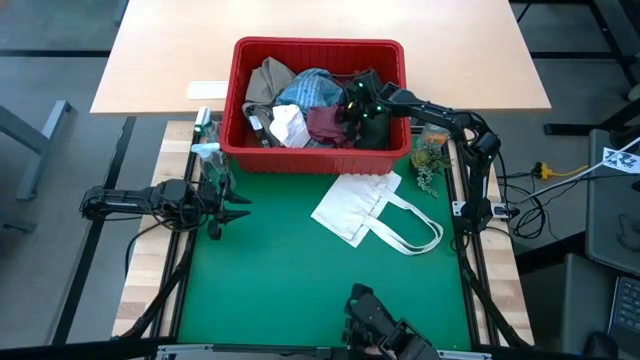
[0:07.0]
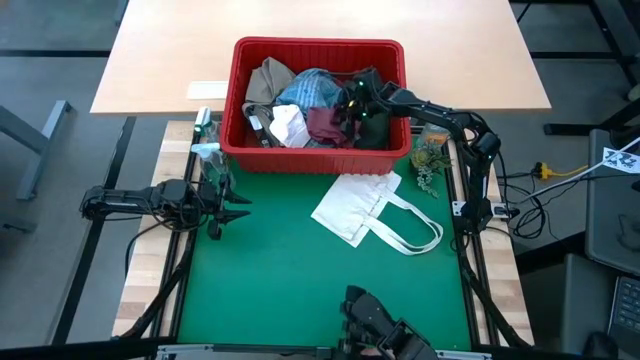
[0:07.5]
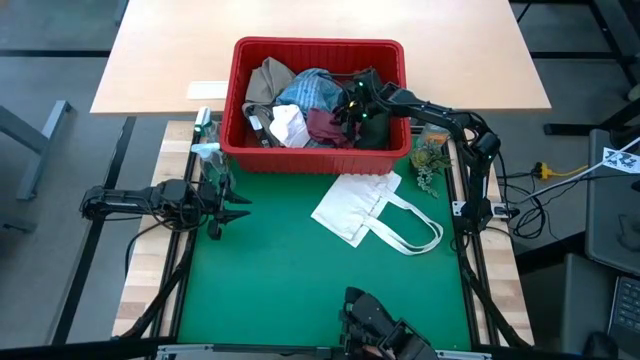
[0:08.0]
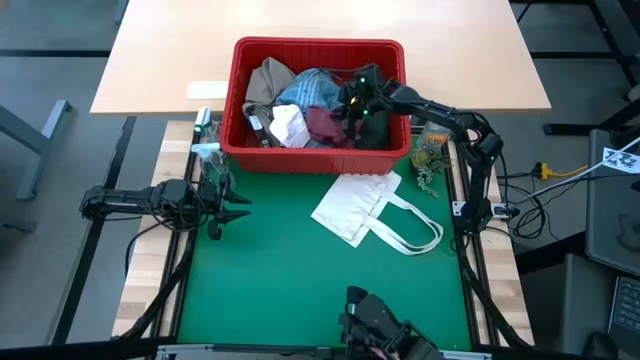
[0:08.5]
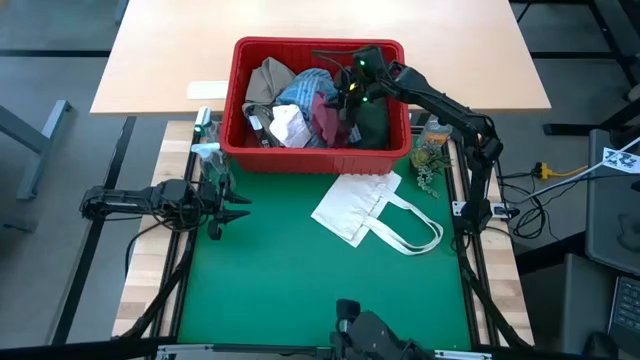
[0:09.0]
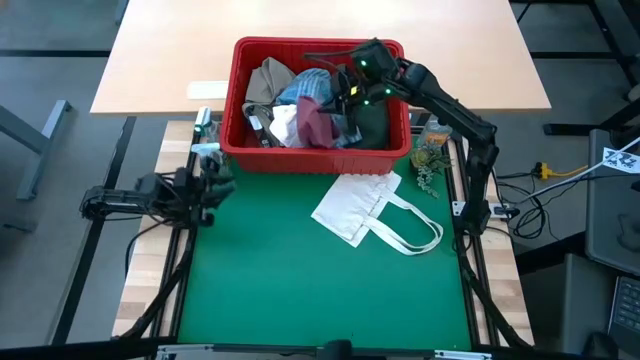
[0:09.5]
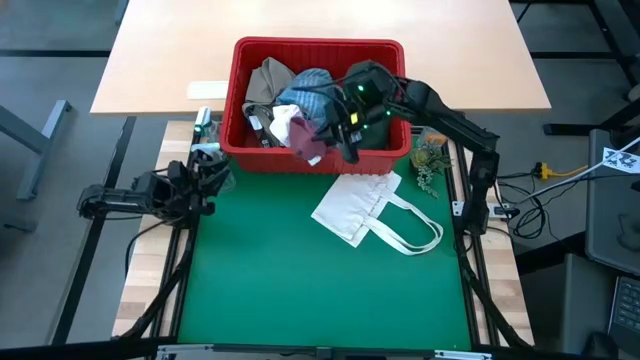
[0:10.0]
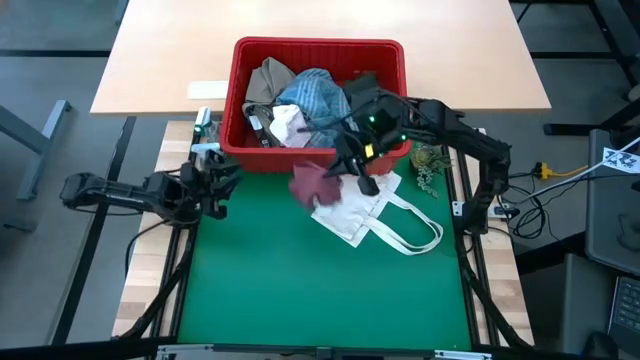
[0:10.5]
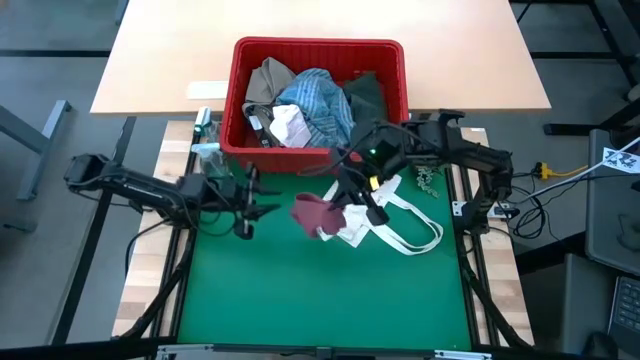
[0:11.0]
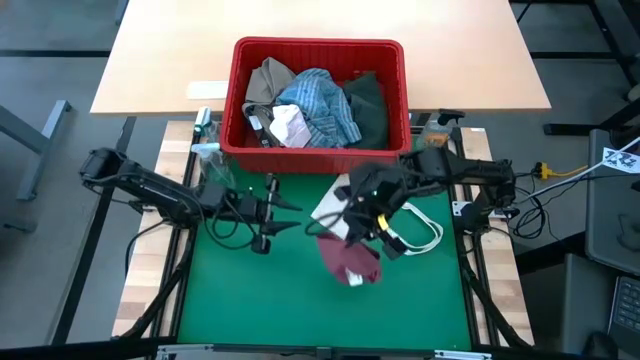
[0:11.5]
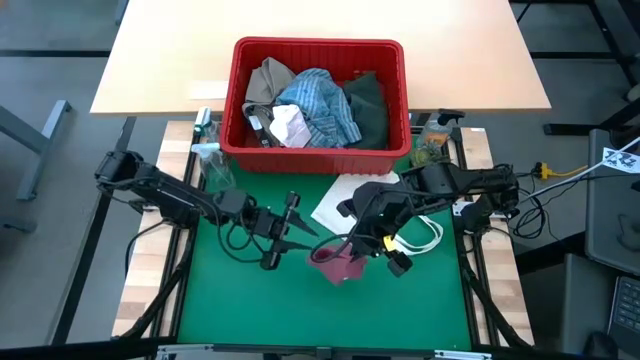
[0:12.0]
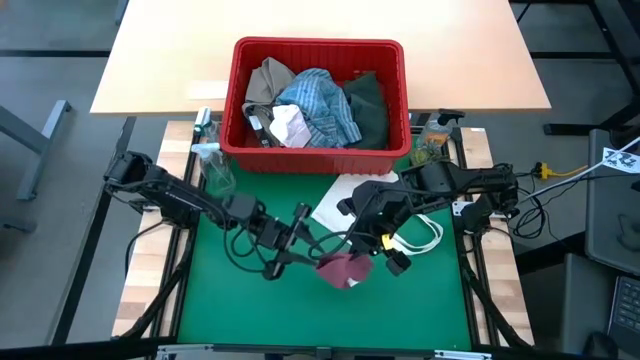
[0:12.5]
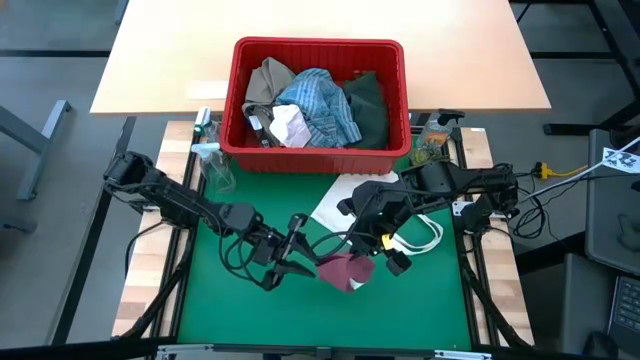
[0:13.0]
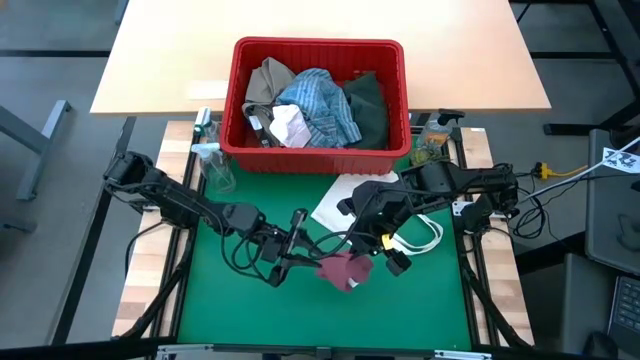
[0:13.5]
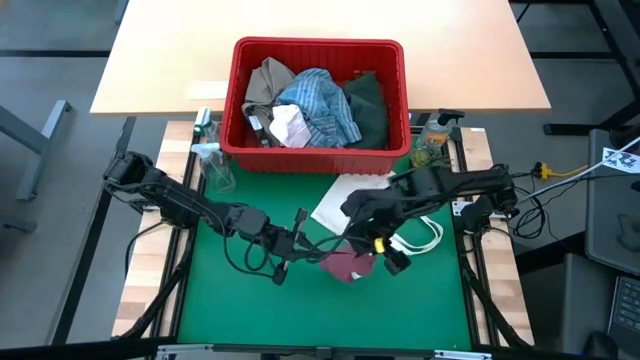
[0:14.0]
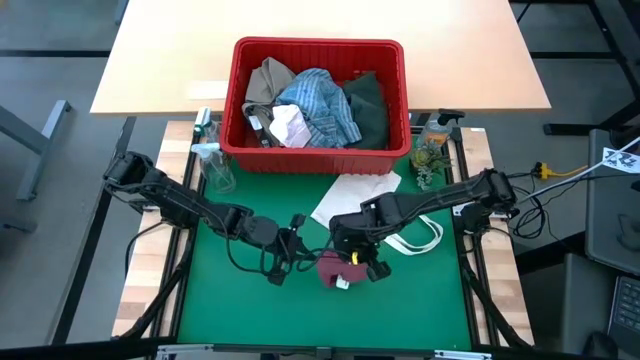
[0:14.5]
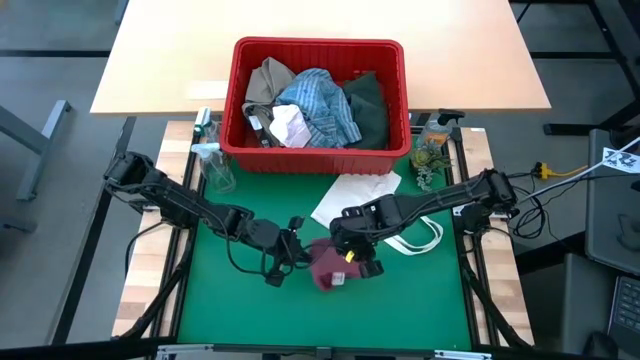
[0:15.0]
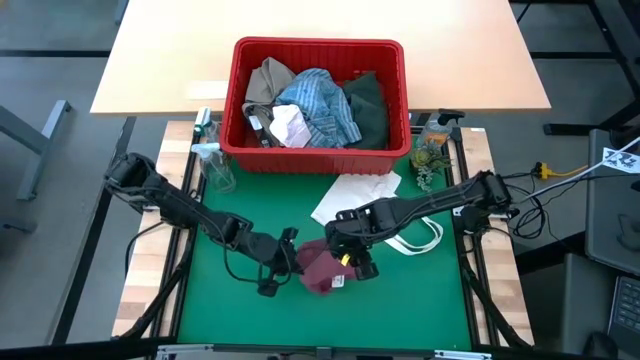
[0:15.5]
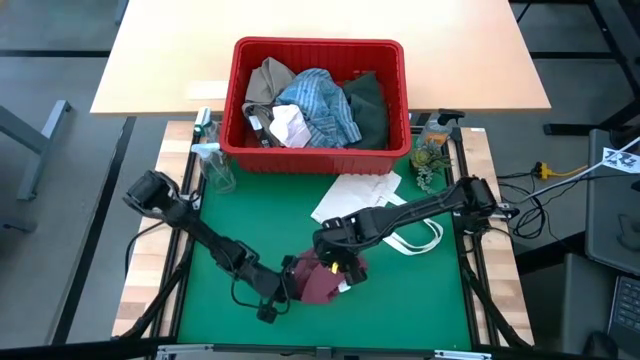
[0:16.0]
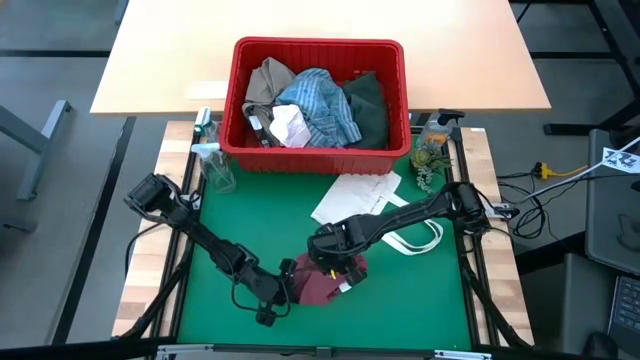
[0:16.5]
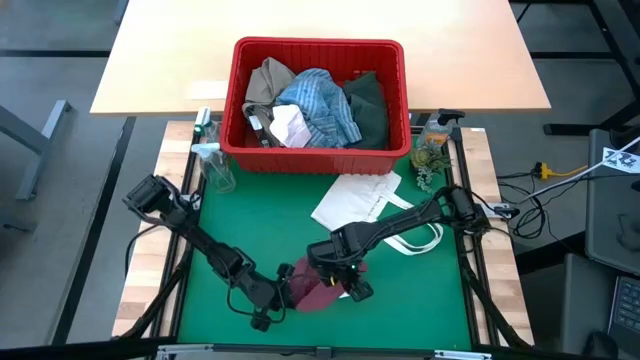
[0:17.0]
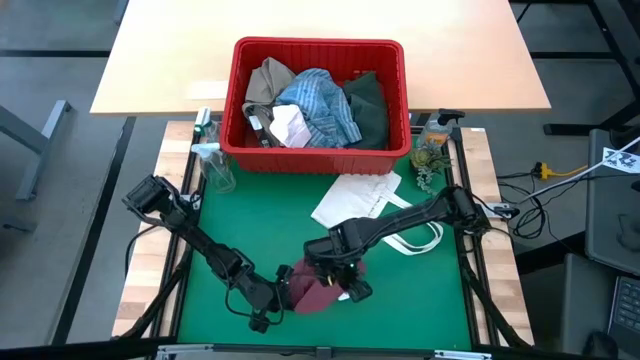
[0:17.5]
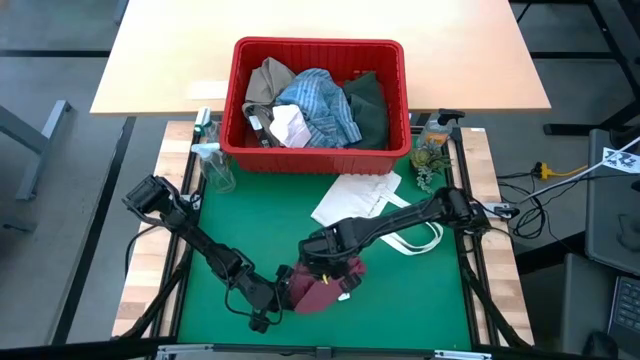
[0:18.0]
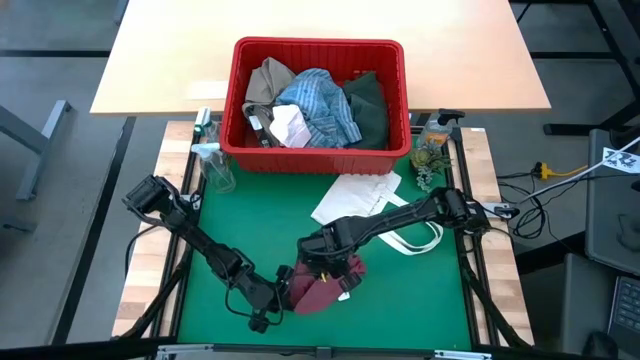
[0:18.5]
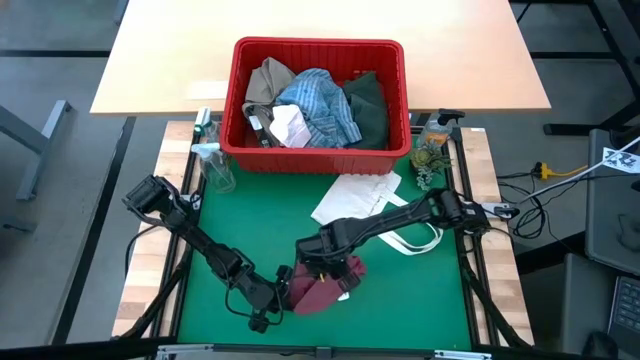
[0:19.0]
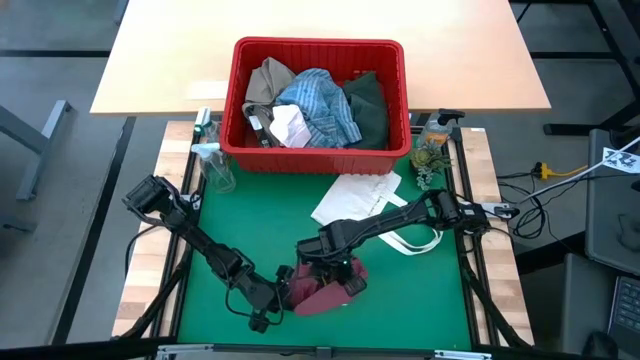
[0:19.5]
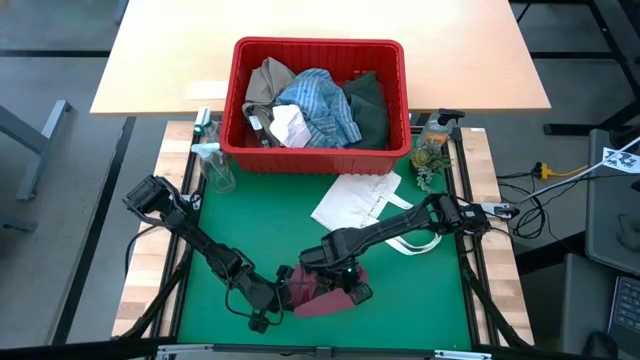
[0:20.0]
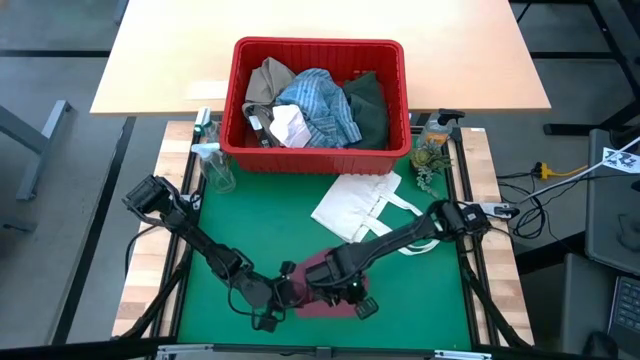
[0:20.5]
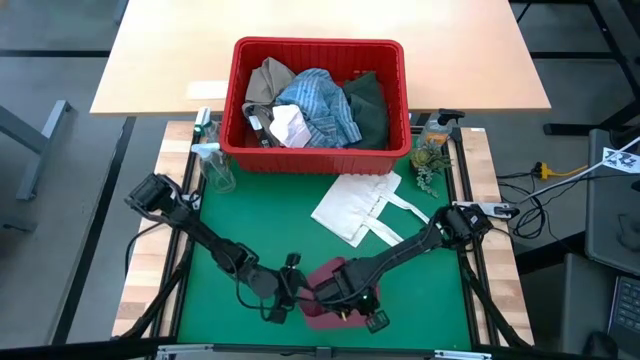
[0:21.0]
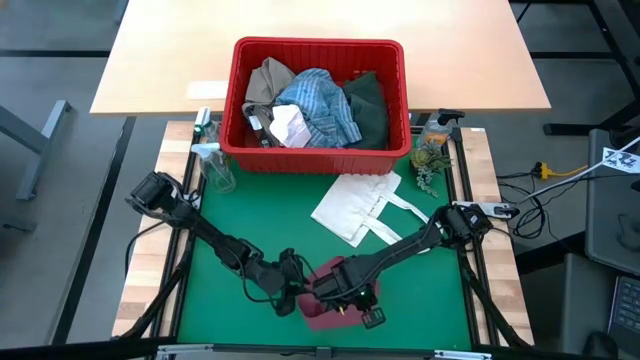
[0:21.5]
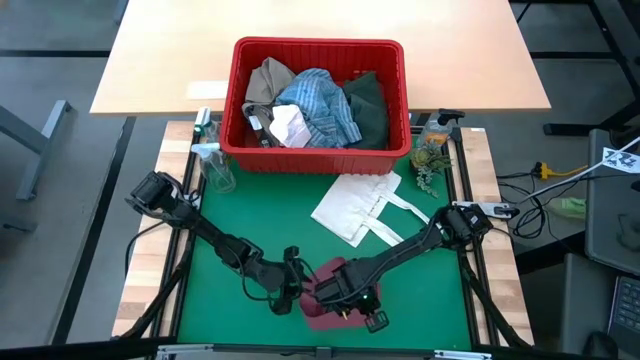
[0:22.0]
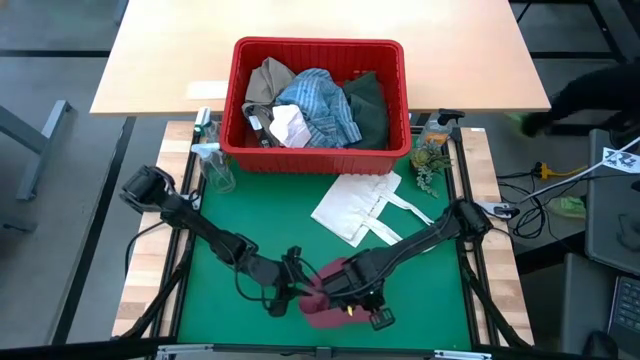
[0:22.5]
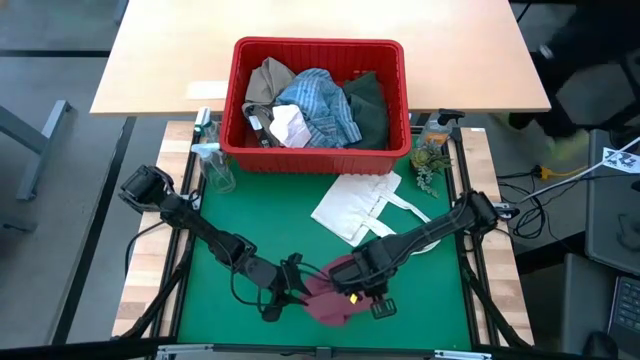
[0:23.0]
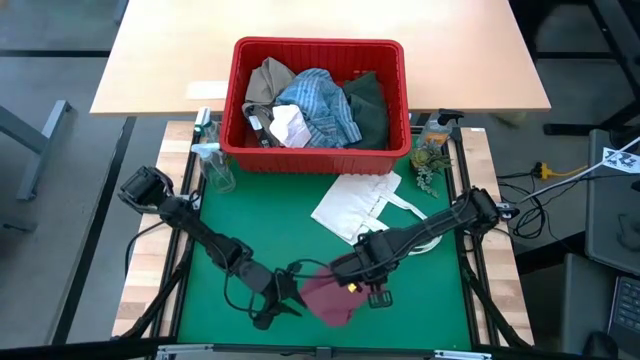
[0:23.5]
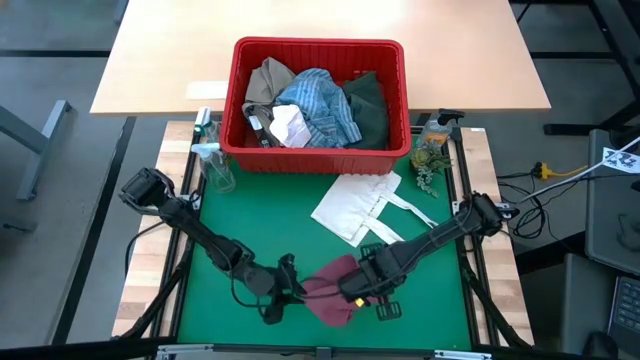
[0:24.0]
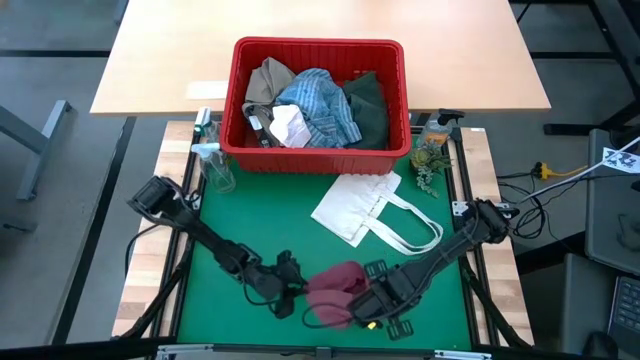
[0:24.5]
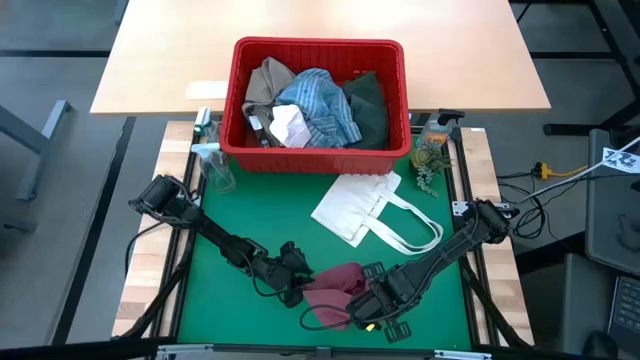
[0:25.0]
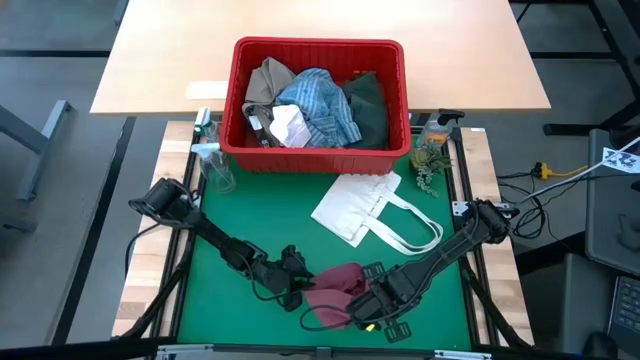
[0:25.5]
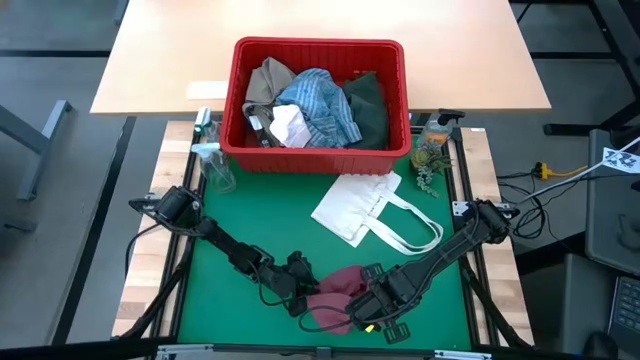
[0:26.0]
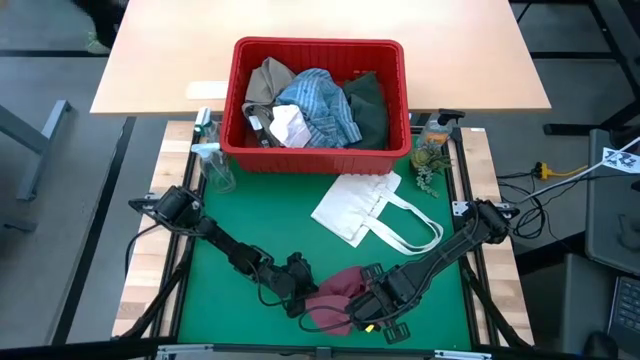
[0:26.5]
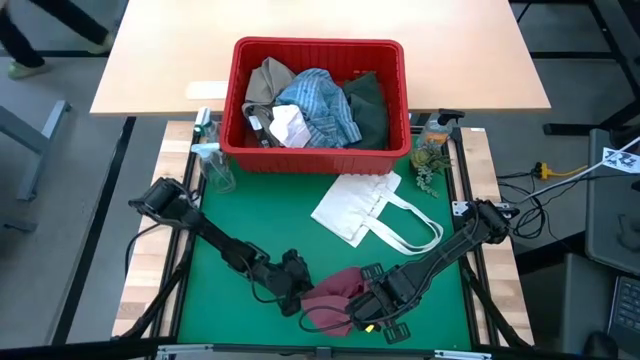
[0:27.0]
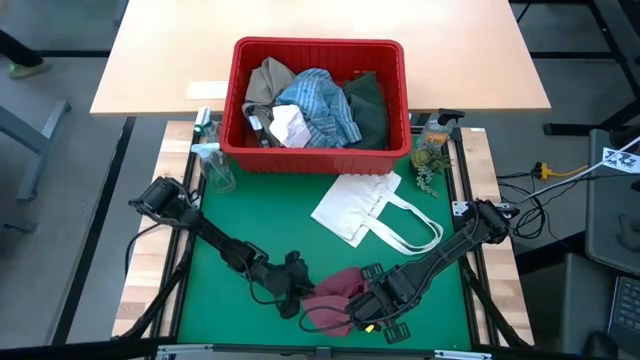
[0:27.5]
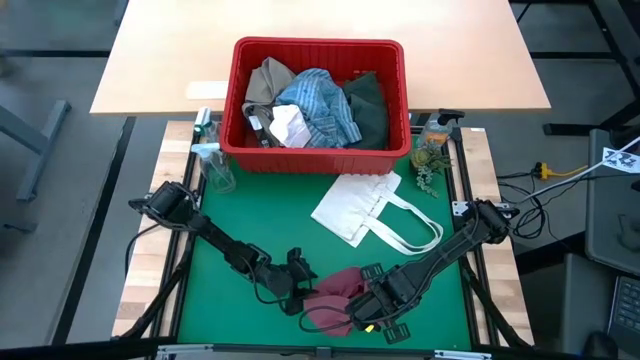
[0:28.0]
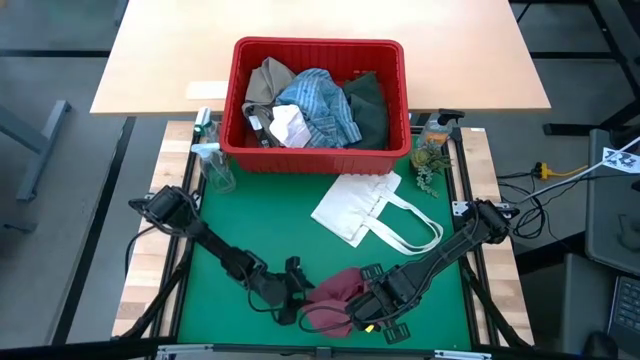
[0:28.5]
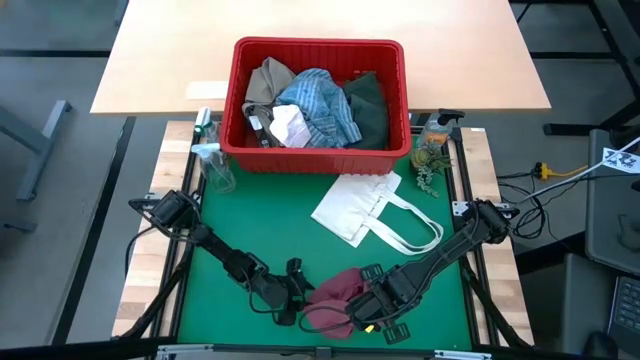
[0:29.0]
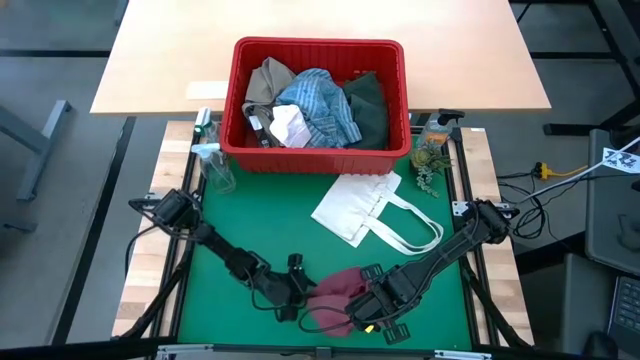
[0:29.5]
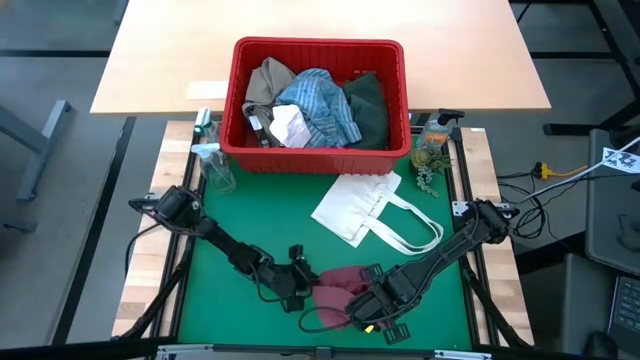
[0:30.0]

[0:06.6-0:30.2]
Task: Fold Laundry from Bin
Remove the pink underwear from the red bin
